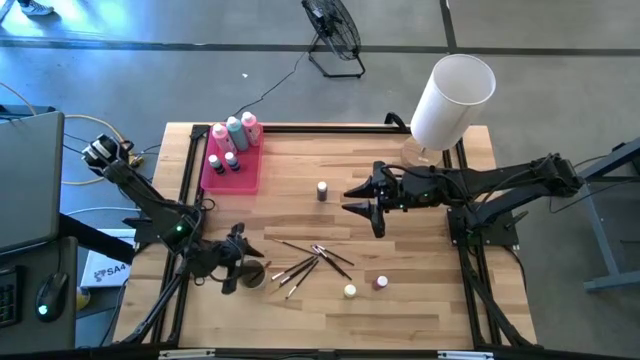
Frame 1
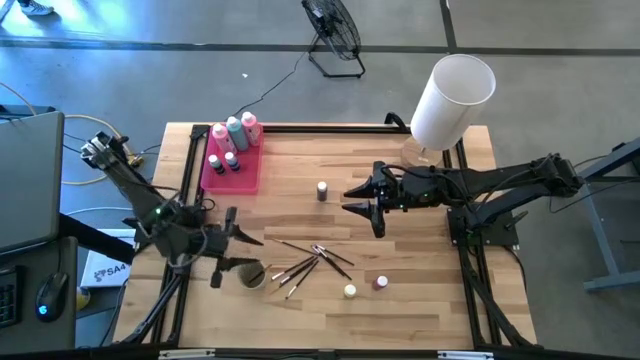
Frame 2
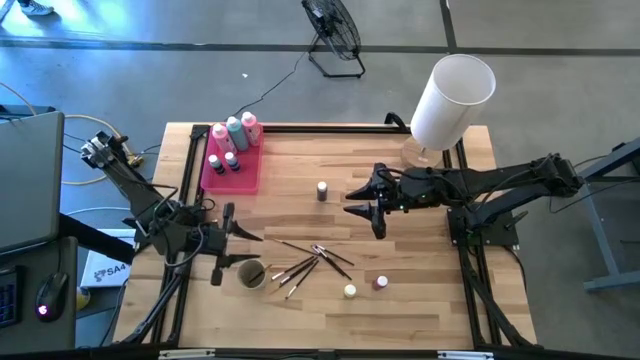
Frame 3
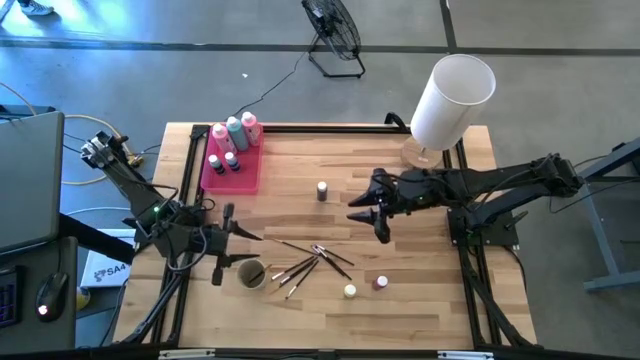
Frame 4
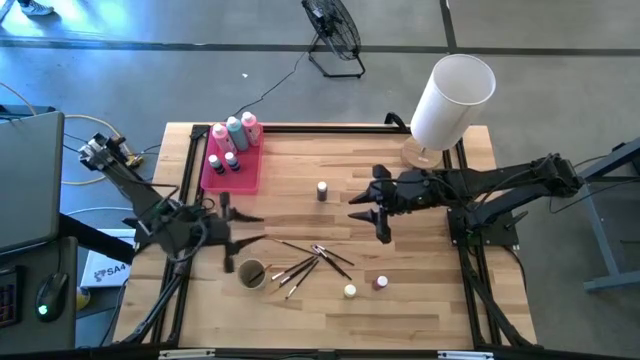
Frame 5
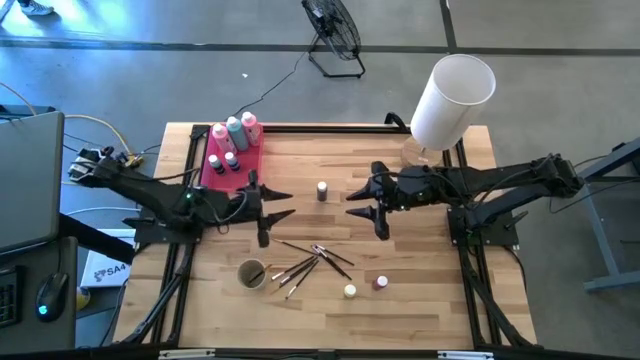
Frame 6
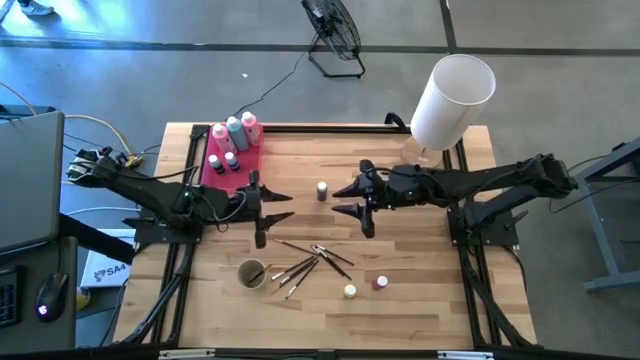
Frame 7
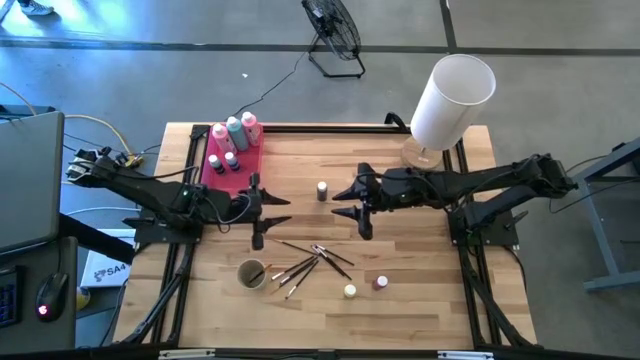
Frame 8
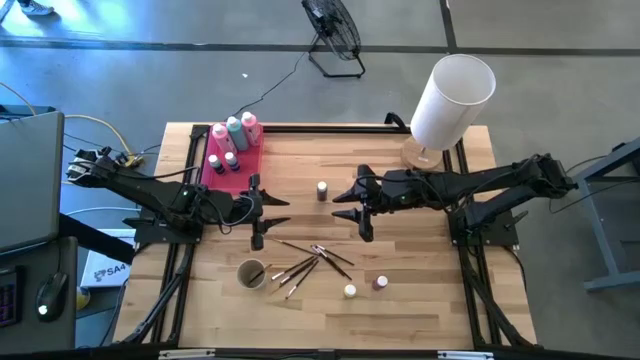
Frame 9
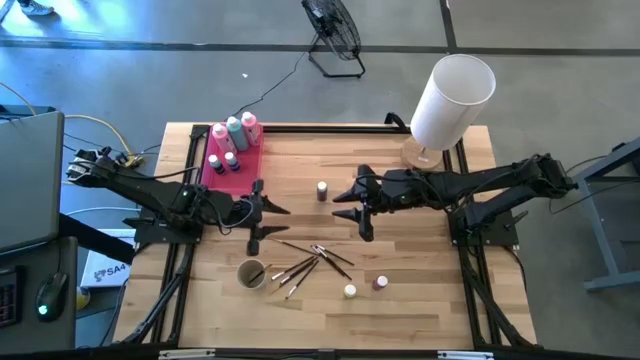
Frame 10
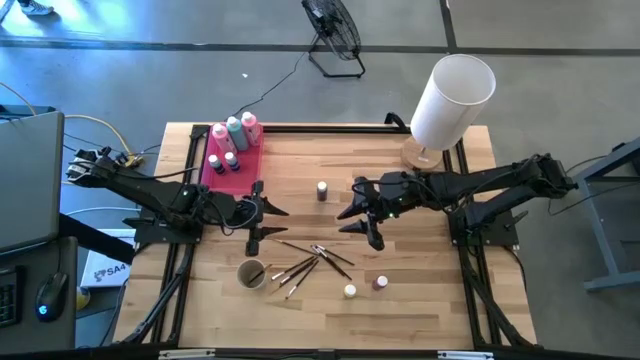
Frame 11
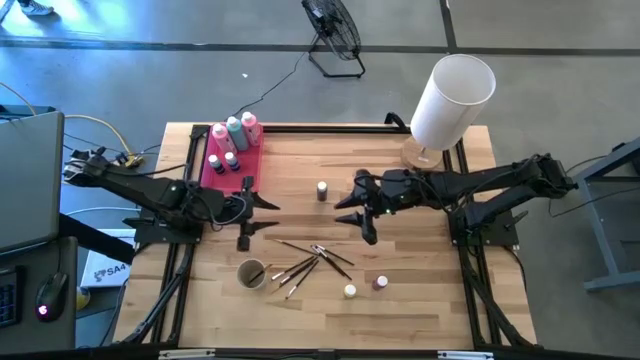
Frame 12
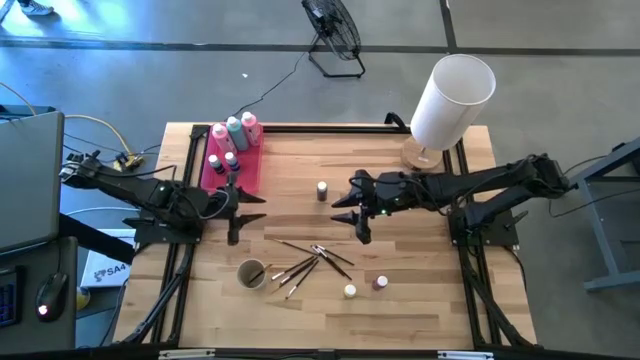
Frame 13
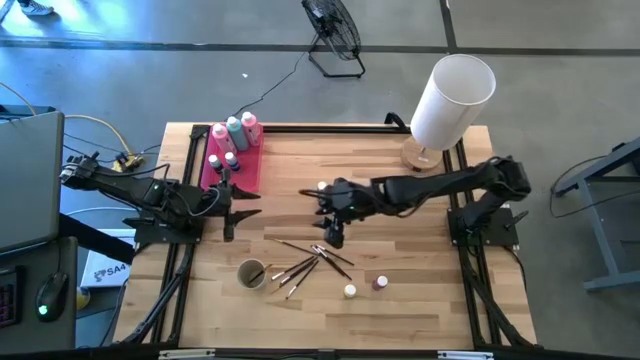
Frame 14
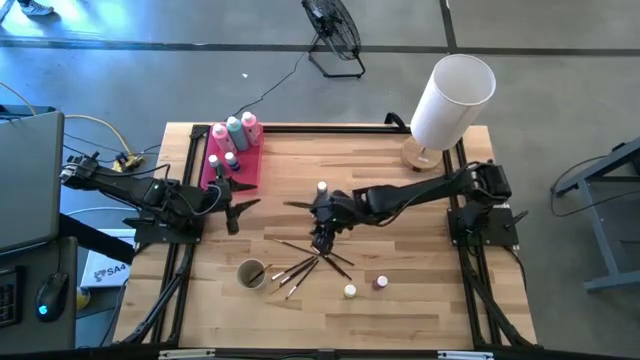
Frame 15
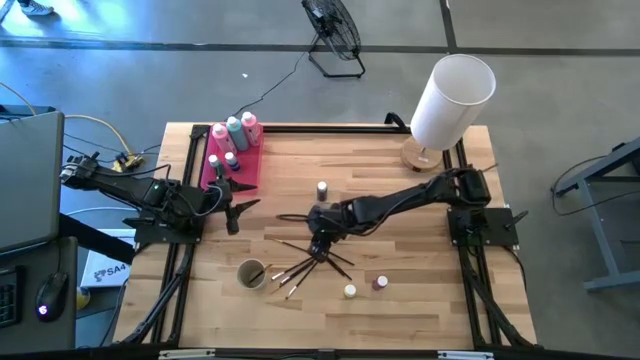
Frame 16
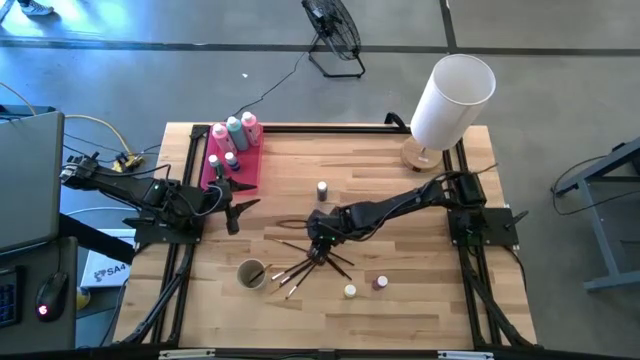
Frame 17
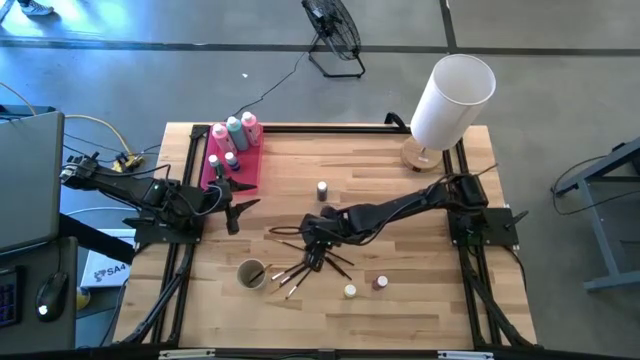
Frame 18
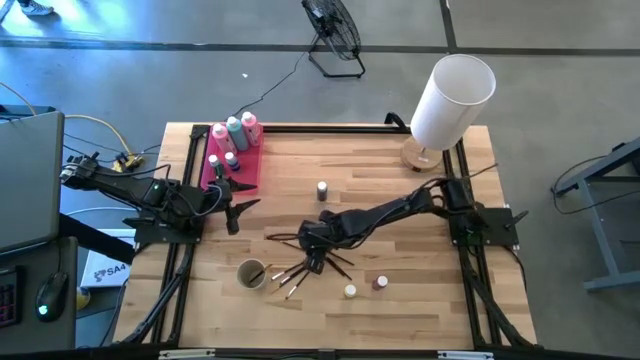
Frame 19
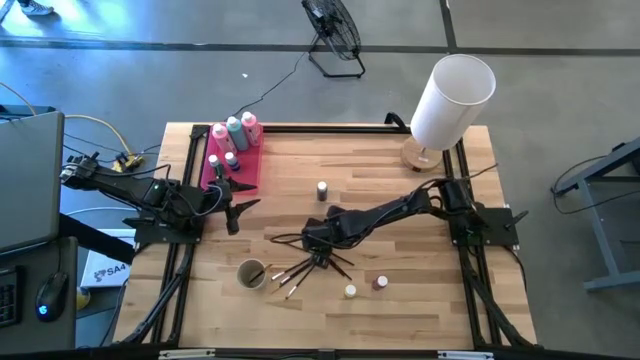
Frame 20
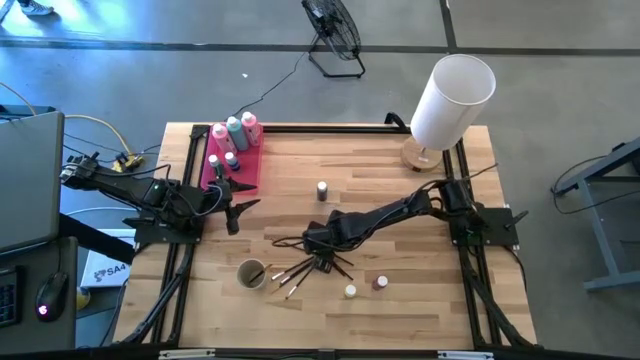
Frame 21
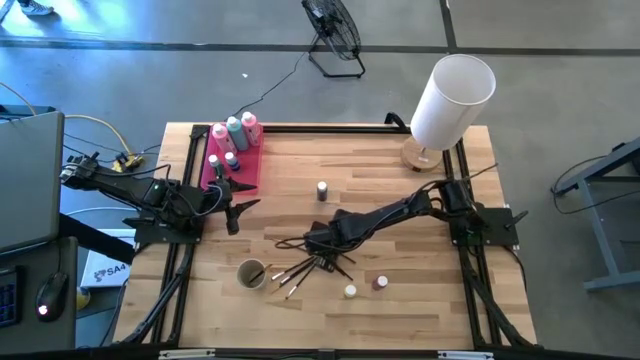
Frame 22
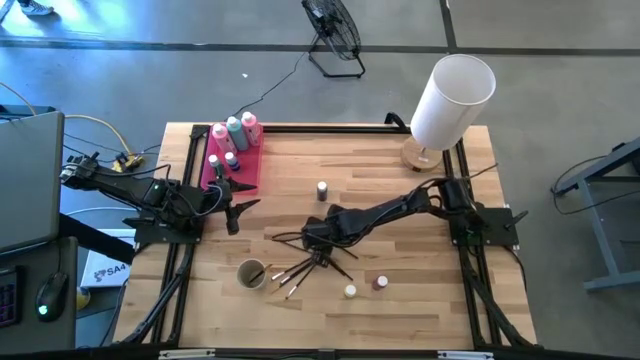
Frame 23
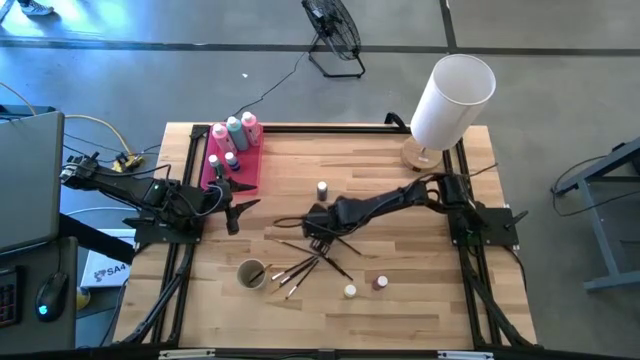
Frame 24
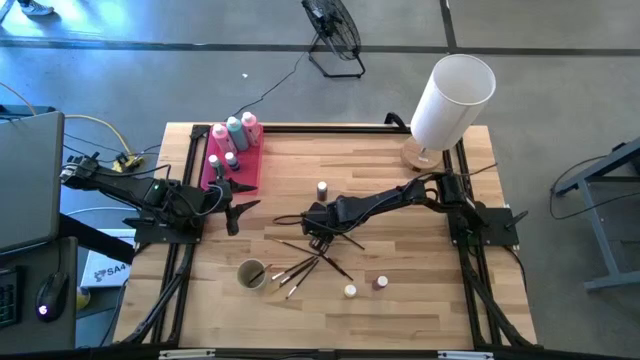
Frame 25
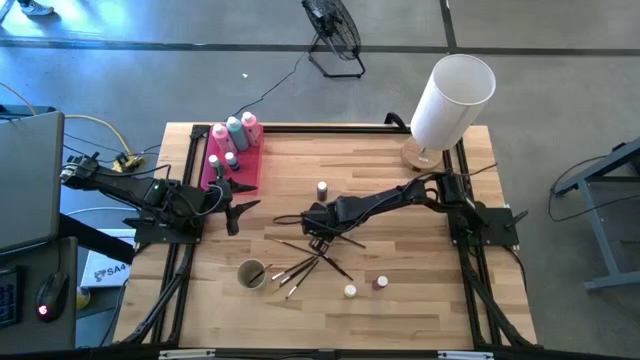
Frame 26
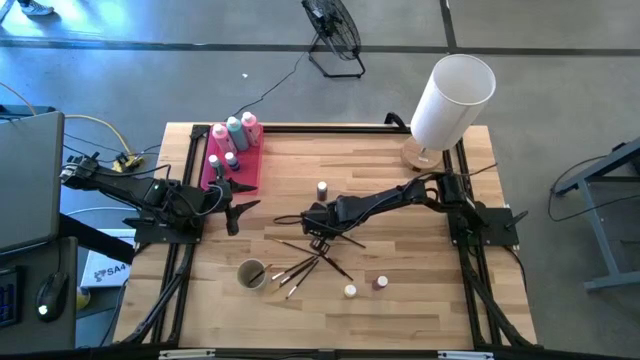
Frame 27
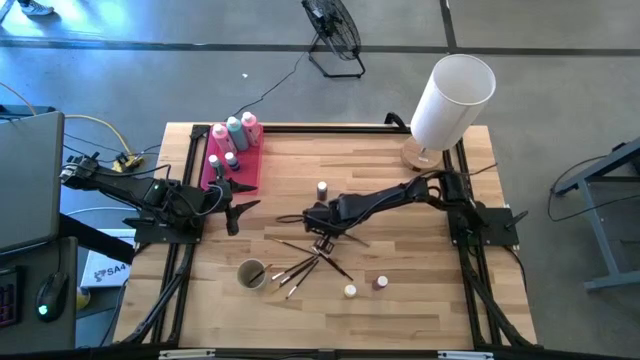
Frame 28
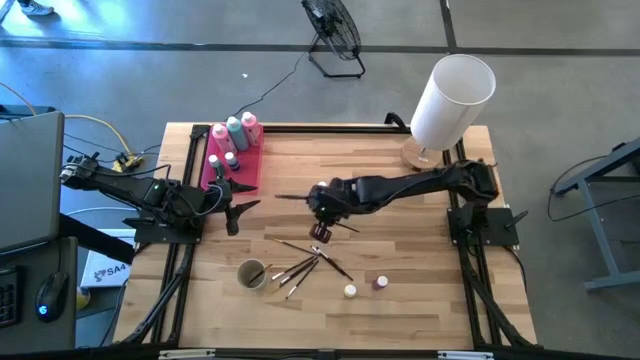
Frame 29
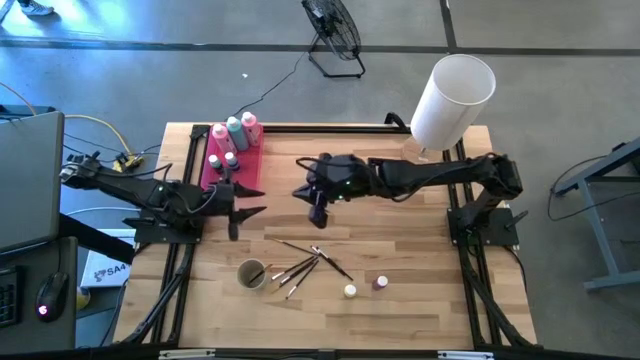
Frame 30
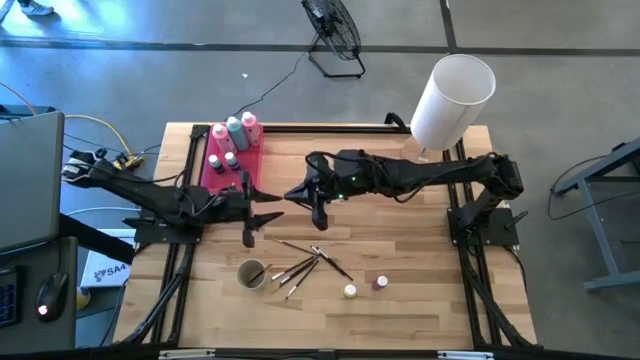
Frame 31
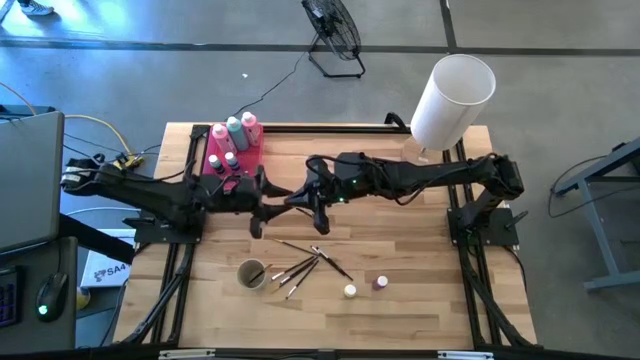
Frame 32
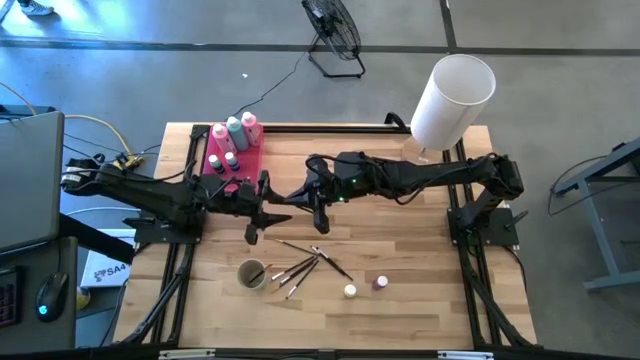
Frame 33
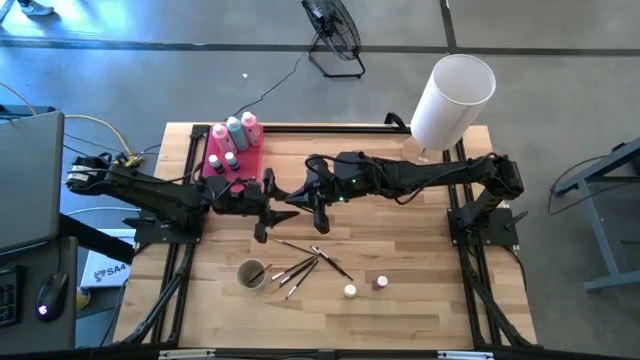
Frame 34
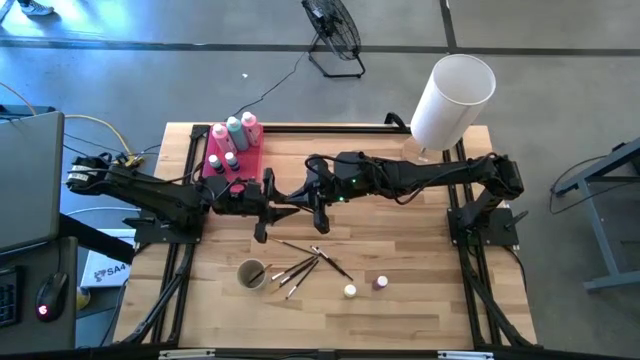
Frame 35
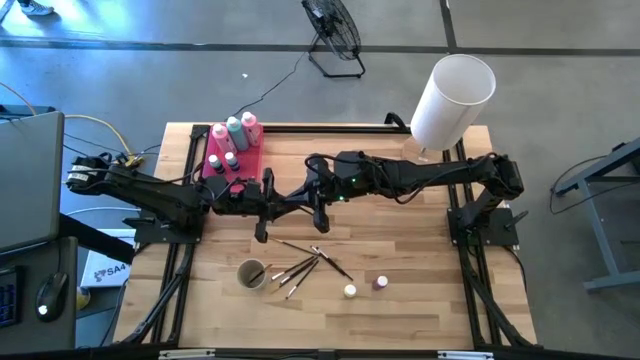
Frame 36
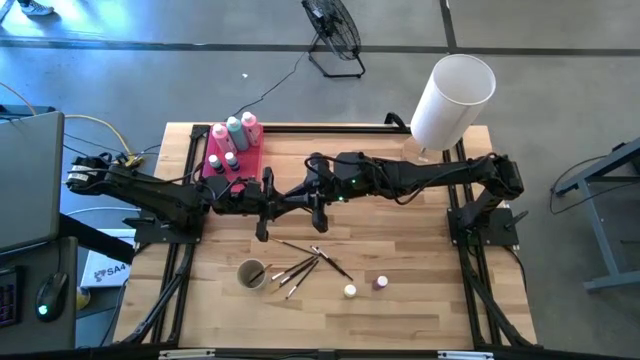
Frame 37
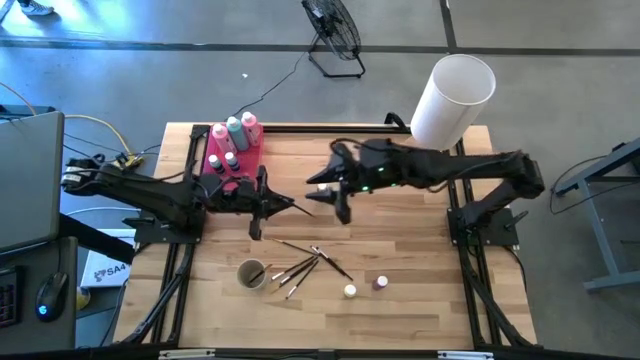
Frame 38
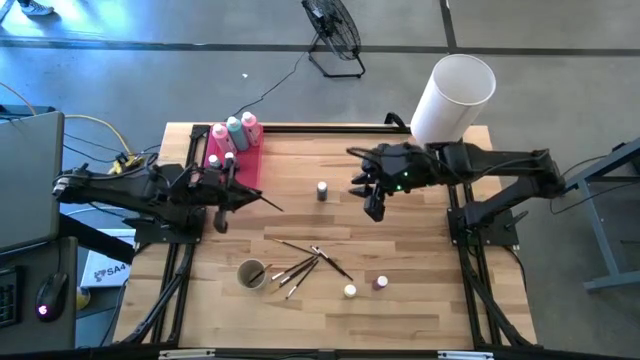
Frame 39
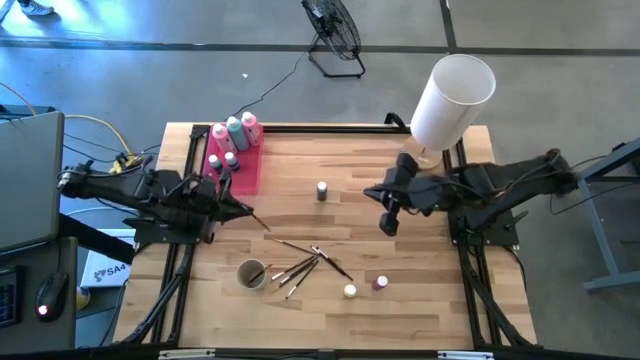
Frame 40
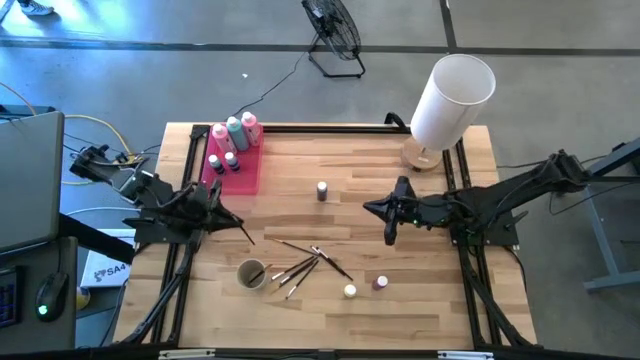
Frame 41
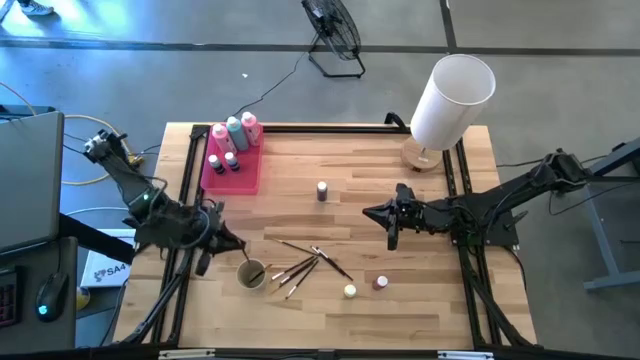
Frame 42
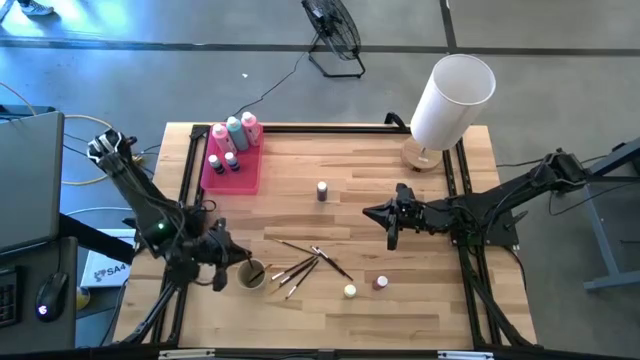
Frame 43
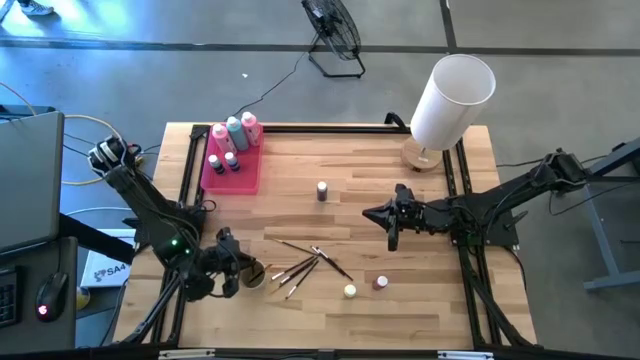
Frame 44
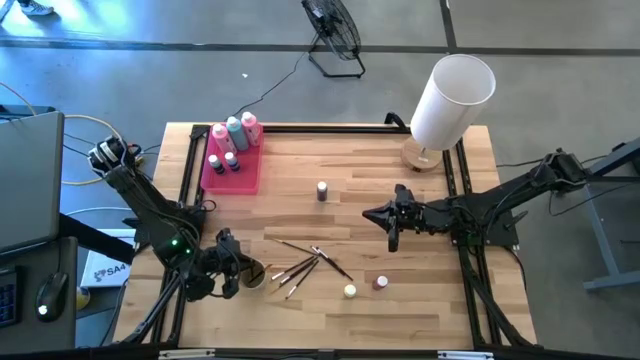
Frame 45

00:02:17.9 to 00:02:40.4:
Task: Pick & Place Paint Supplies
Put the silver paintbrush into the light brown cup
